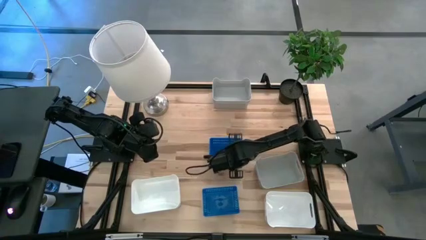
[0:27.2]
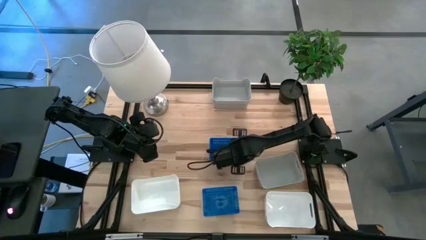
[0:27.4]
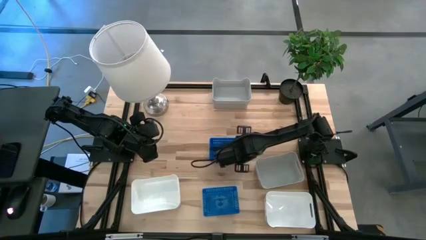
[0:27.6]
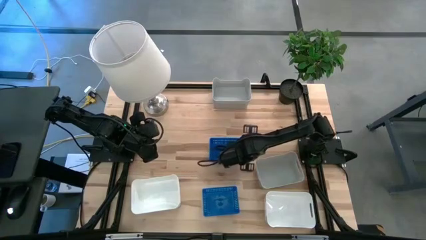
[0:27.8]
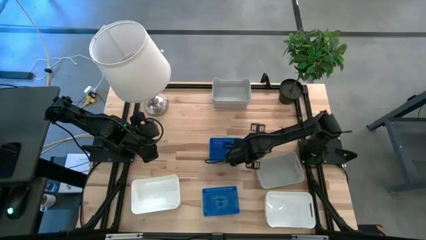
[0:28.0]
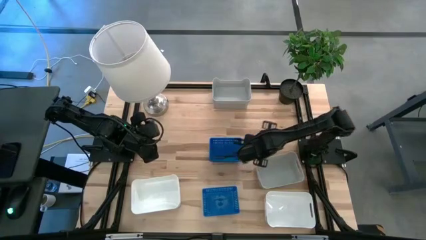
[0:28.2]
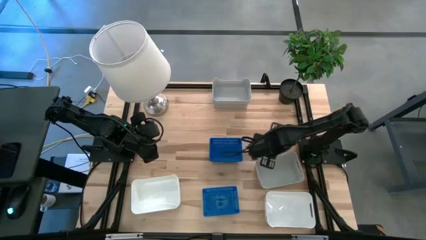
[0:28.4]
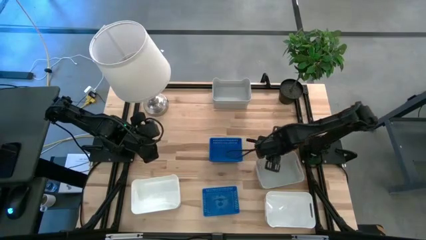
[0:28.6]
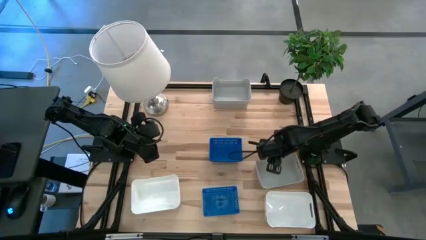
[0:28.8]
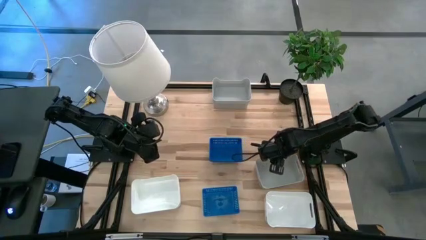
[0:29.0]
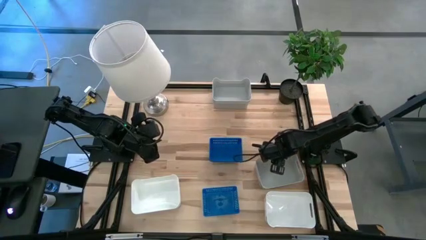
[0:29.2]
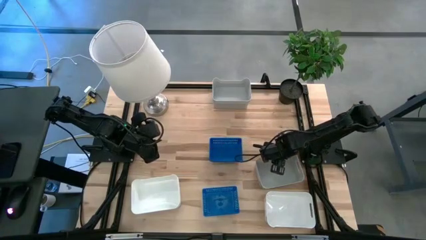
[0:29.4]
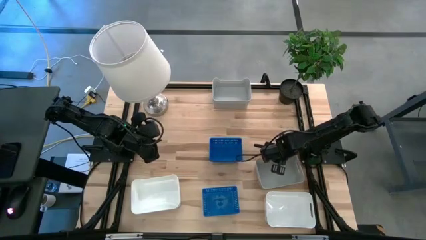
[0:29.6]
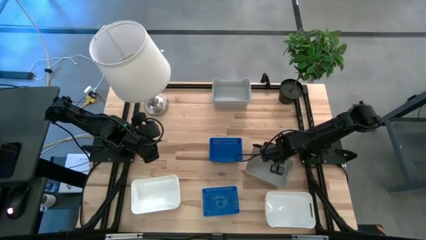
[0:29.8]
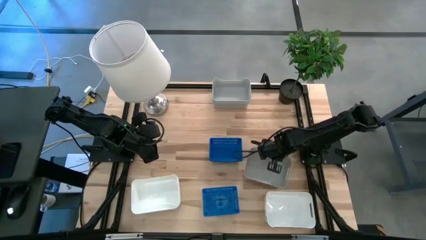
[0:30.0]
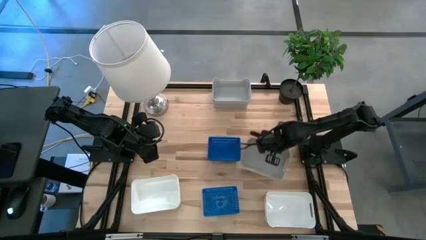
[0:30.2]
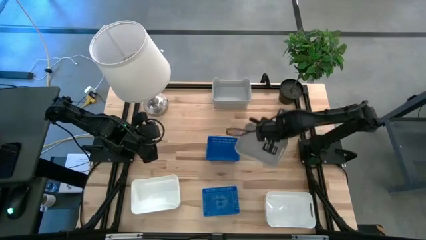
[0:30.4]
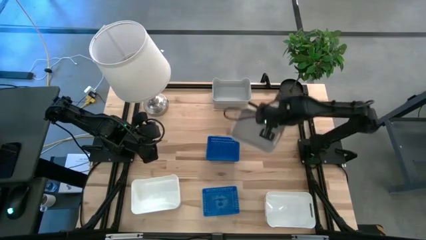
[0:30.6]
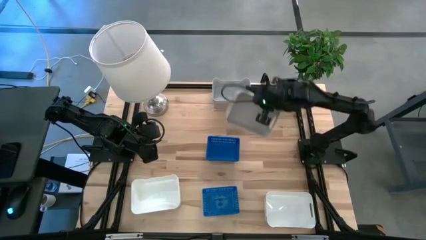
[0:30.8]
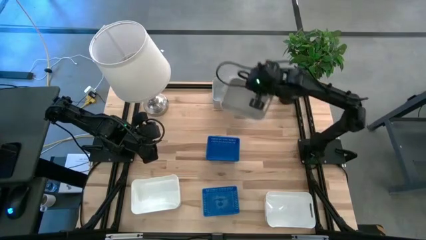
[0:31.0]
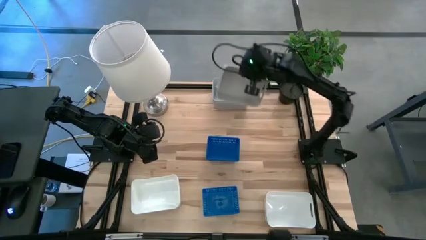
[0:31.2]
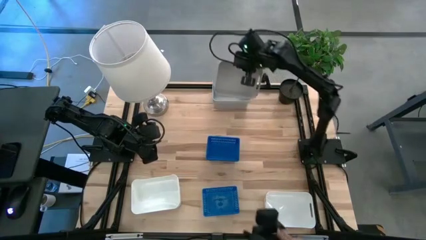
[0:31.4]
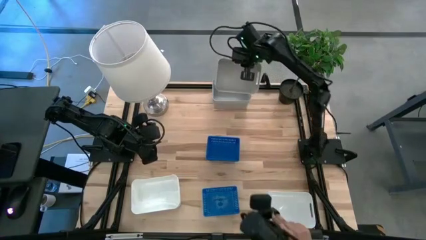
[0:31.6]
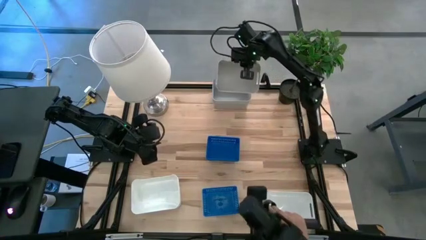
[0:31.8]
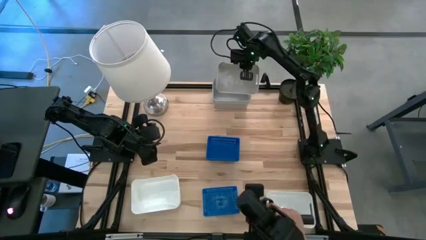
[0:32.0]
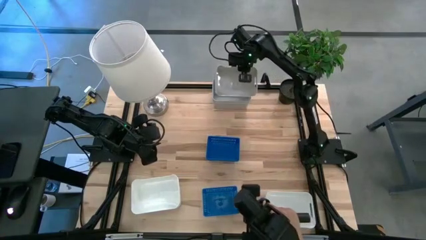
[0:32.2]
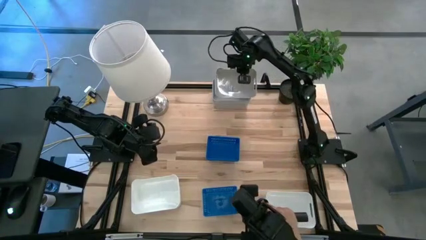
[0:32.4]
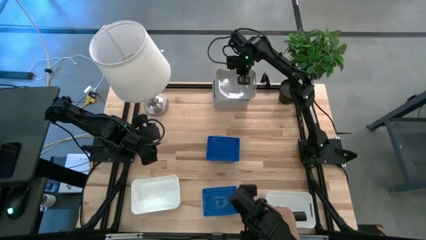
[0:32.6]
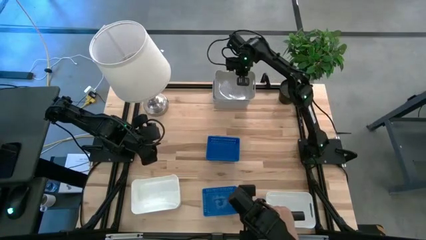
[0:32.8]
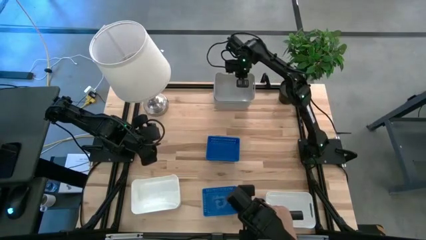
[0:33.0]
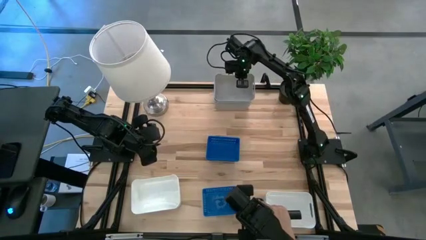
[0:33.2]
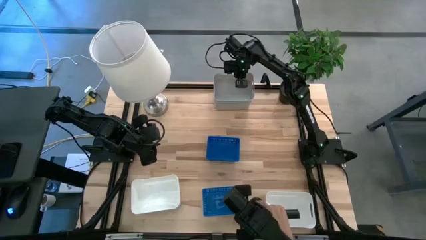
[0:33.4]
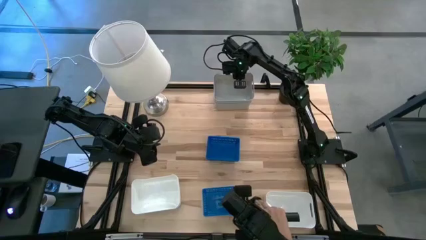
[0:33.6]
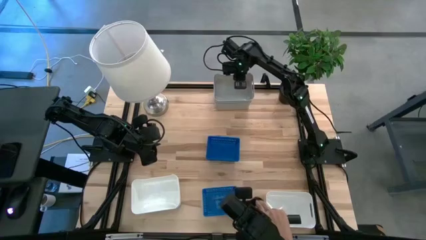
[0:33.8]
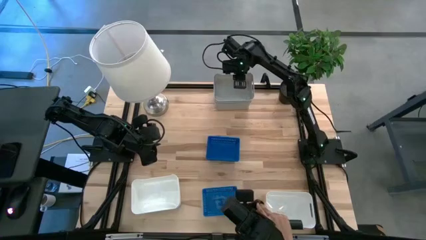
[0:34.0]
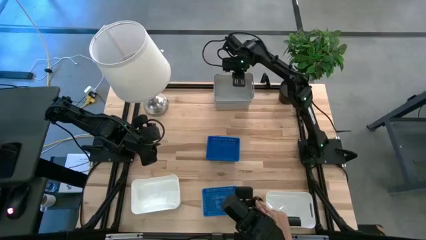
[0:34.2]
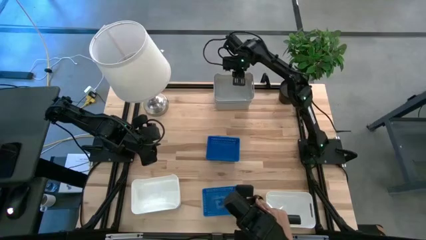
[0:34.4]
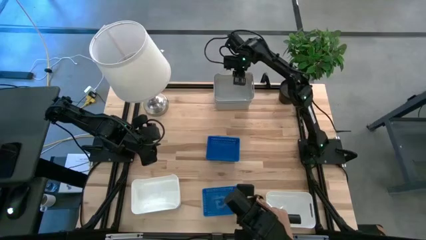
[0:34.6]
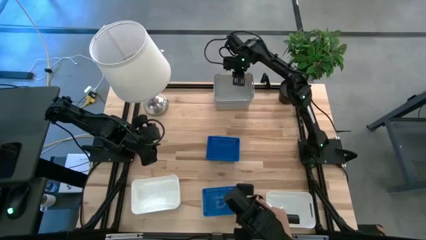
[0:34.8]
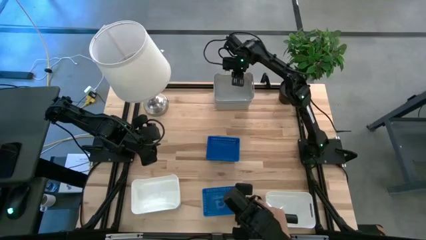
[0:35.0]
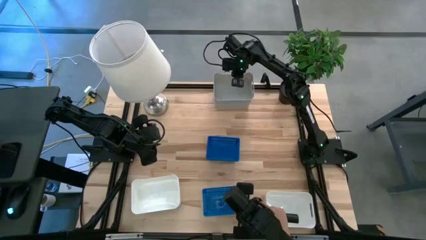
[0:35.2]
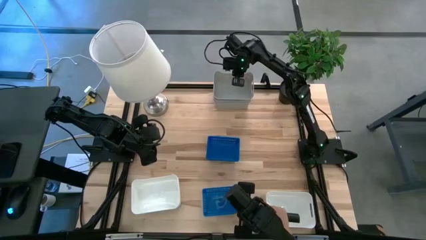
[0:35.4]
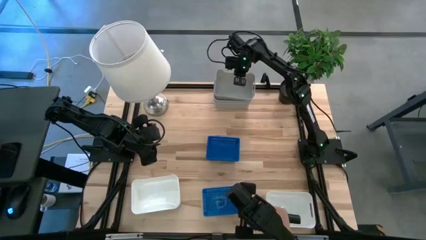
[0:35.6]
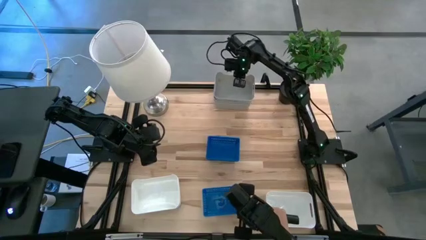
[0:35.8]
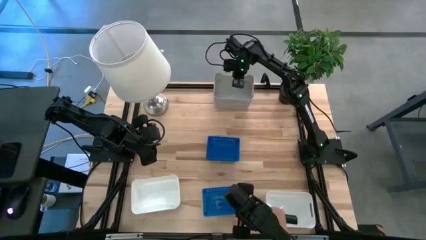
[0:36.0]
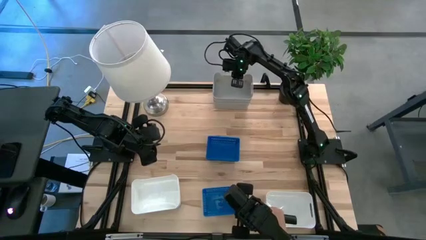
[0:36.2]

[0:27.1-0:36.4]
Stack the bottom gray bin on the gray bin

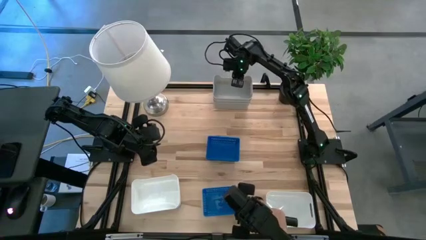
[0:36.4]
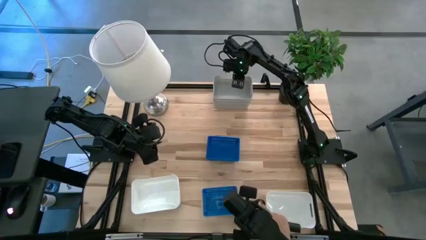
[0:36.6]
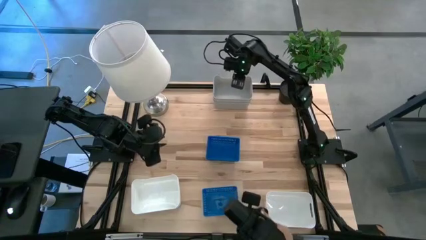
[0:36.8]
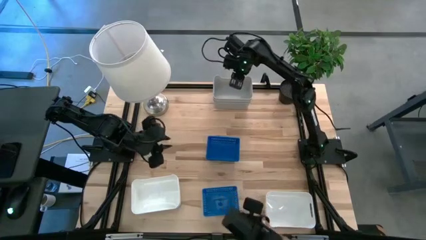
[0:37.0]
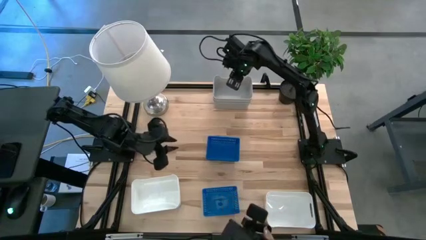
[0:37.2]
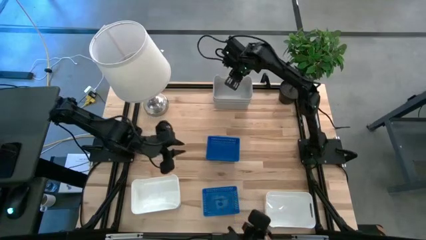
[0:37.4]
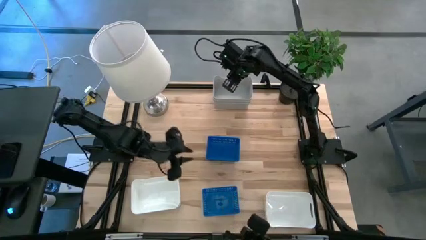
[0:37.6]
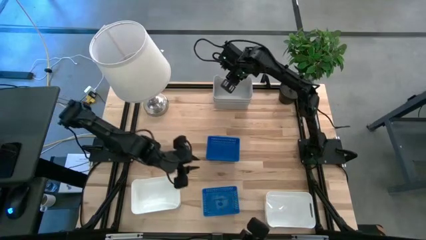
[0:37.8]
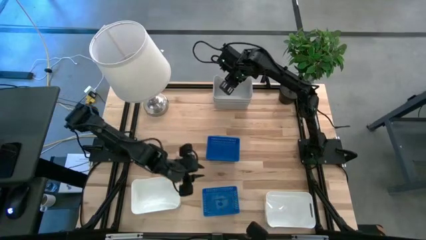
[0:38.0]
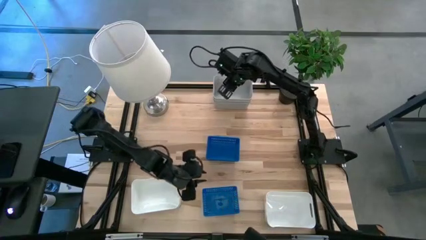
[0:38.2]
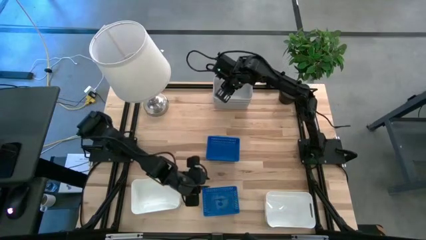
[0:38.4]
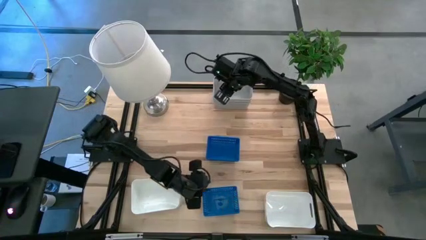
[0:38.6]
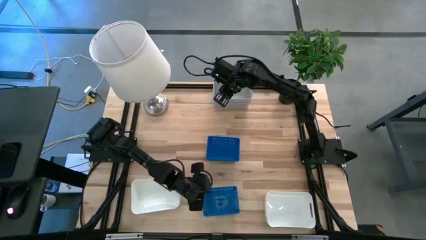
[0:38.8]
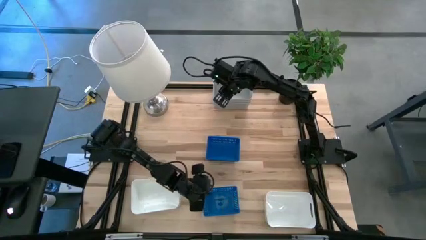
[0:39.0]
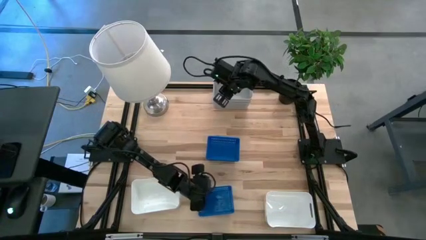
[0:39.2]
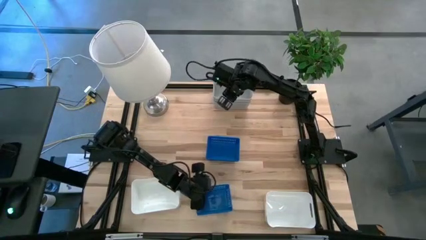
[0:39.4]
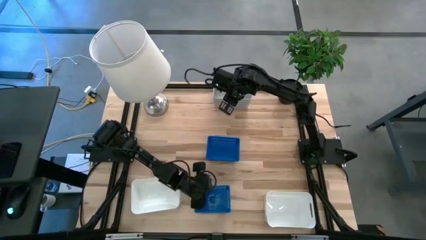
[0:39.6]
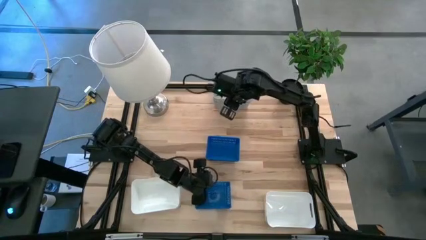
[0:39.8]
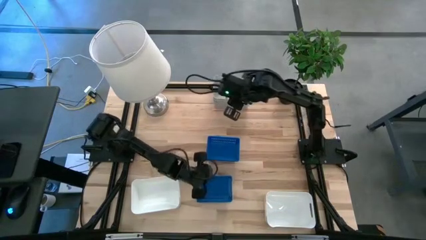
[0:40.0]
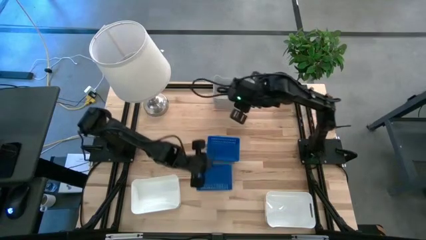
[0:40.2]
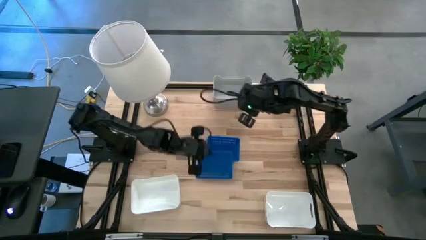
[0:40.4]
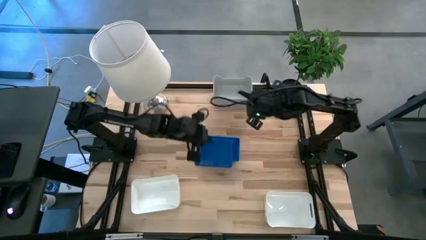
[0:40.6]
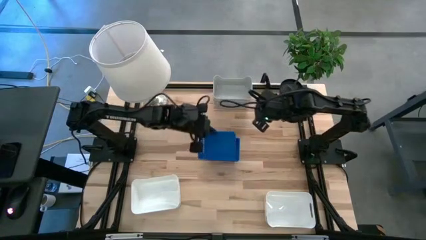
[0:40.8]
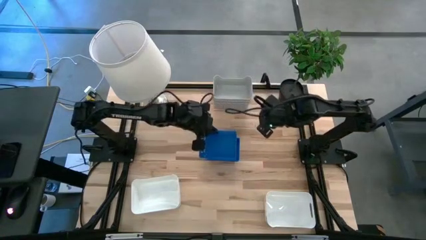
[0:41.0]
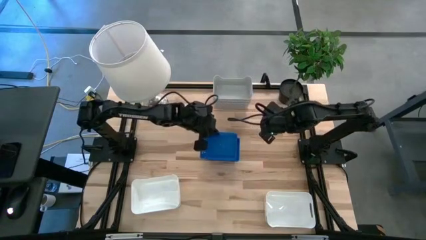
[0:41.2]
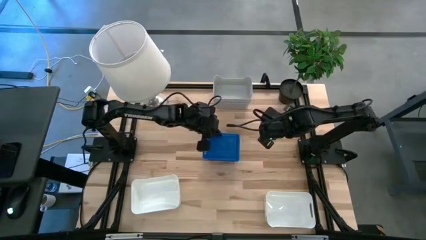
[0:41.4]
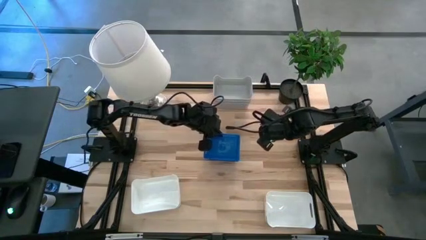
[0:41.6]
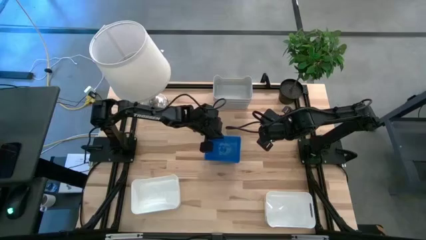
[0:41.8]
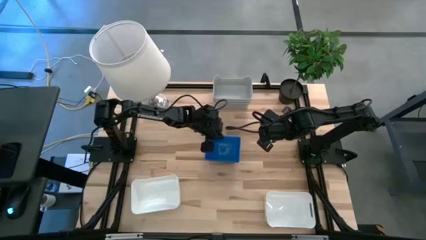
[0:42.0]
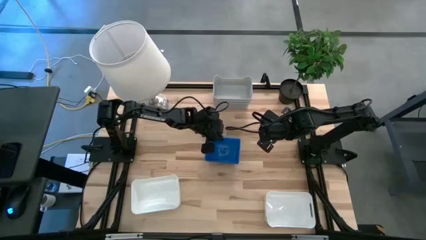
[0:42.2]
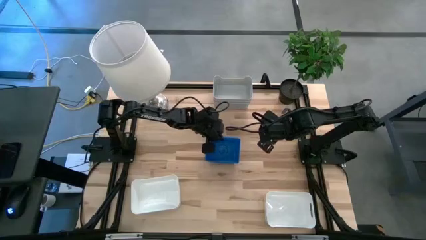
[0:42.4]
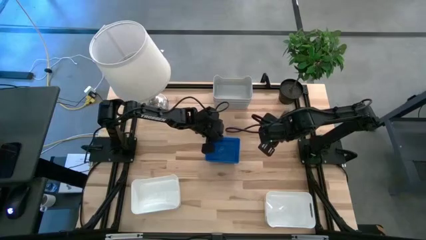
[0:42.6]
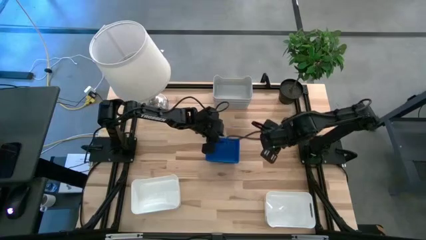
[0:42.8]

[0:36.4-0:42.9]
Stack the bottom blue bin on the blue bin
